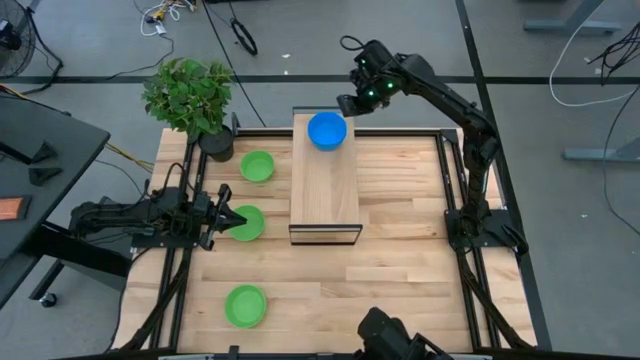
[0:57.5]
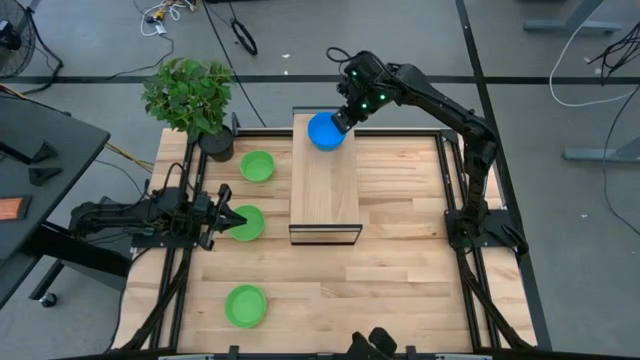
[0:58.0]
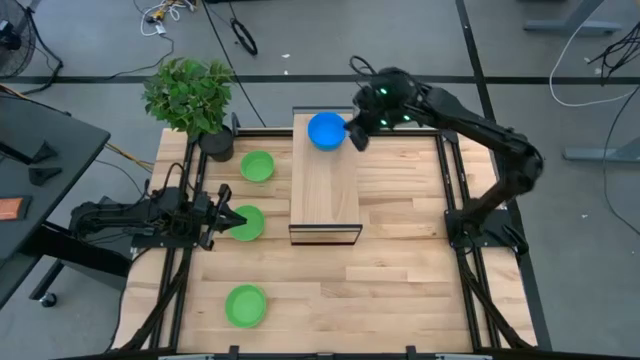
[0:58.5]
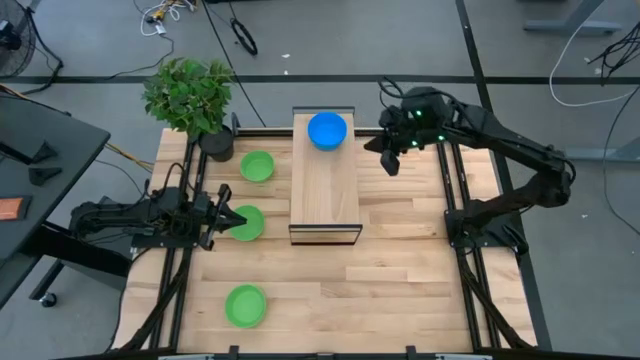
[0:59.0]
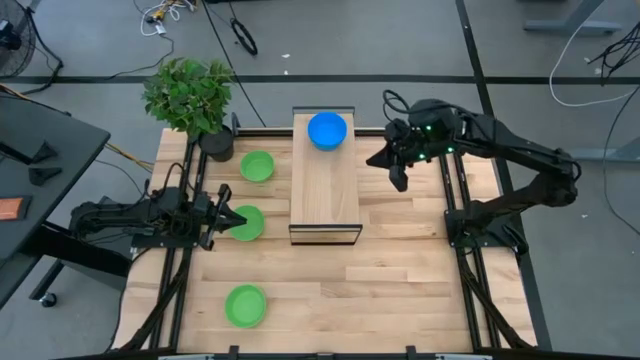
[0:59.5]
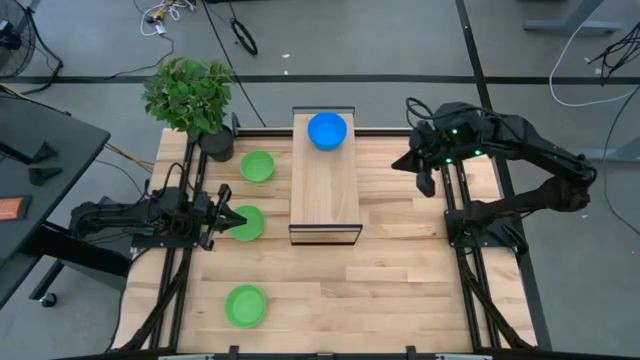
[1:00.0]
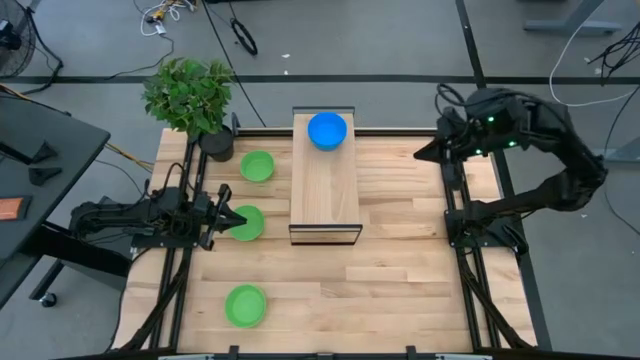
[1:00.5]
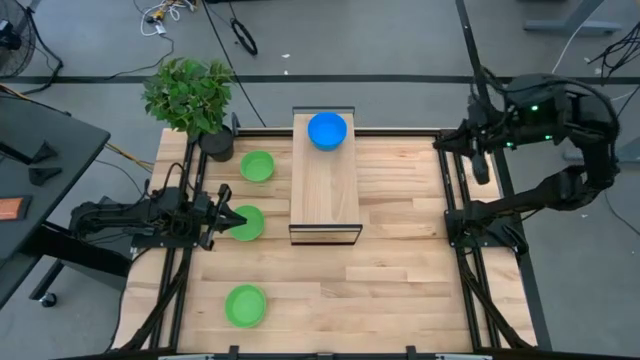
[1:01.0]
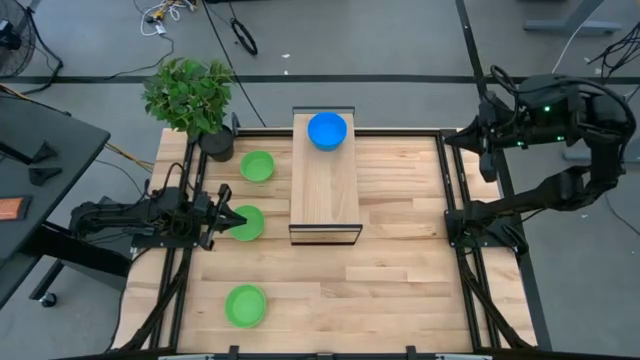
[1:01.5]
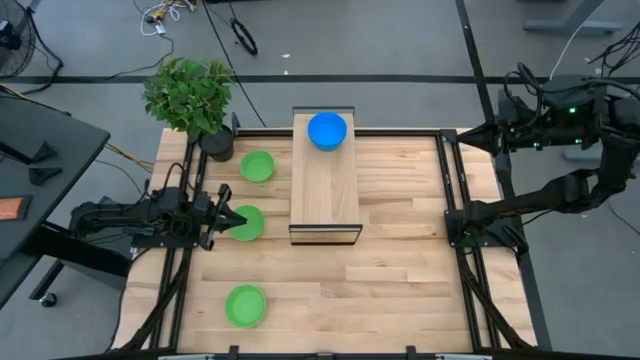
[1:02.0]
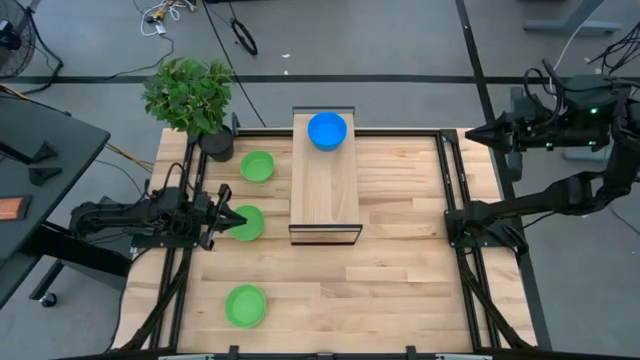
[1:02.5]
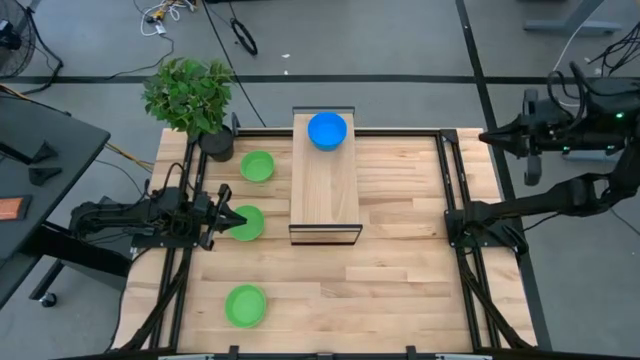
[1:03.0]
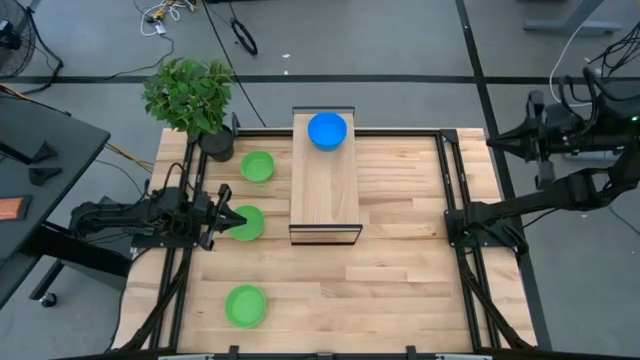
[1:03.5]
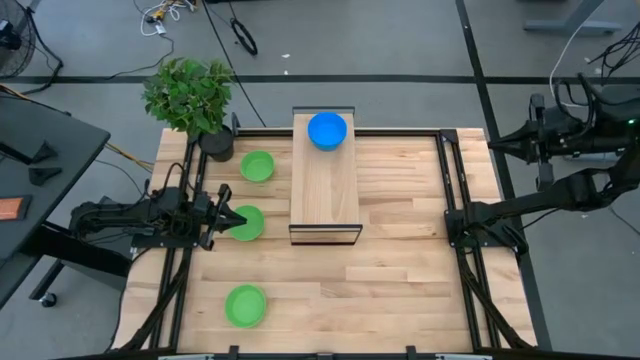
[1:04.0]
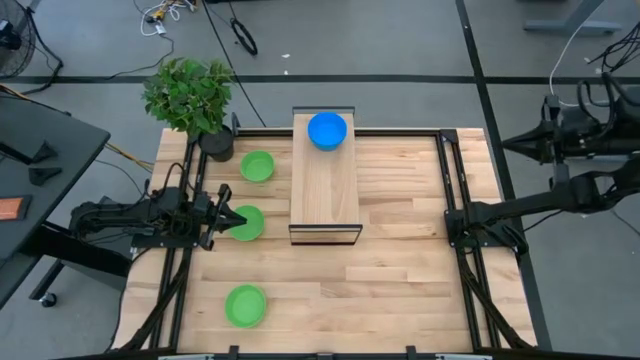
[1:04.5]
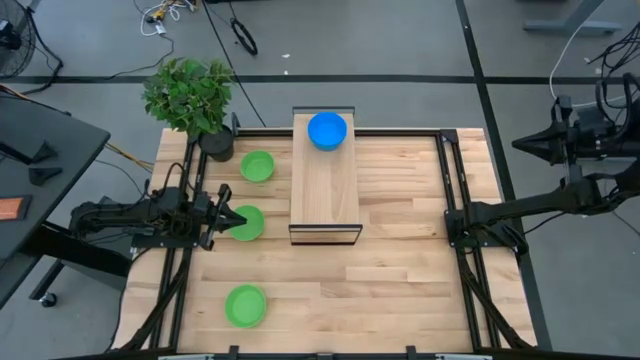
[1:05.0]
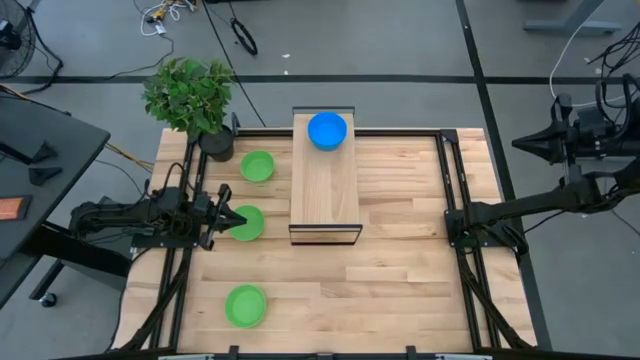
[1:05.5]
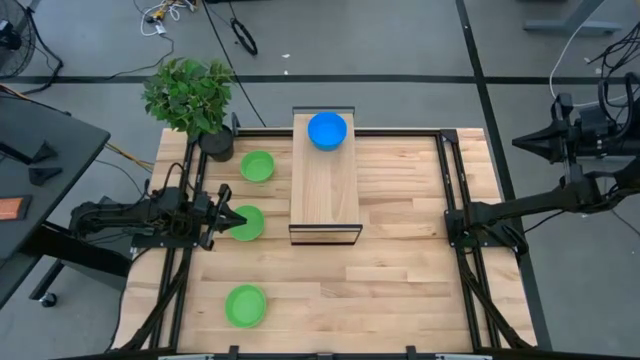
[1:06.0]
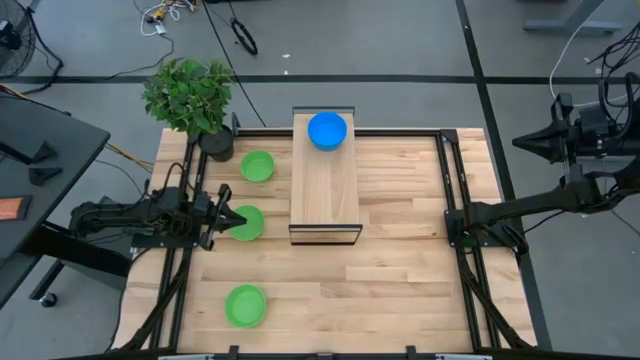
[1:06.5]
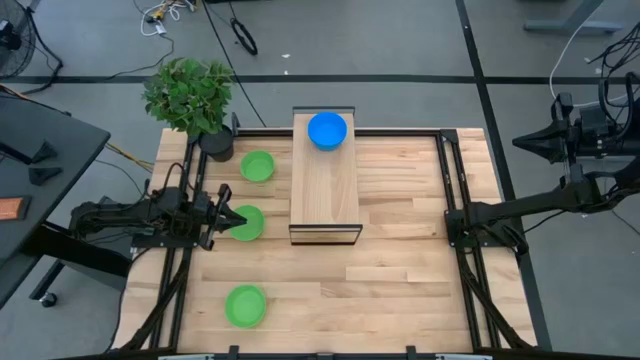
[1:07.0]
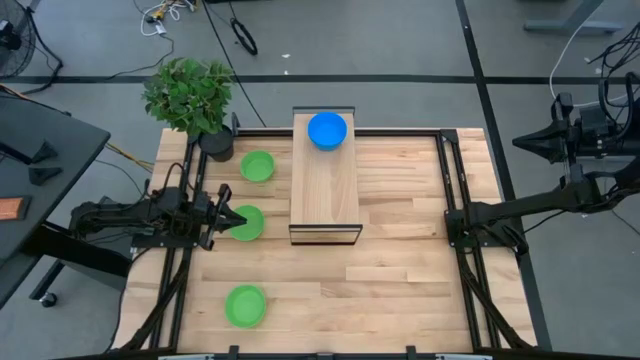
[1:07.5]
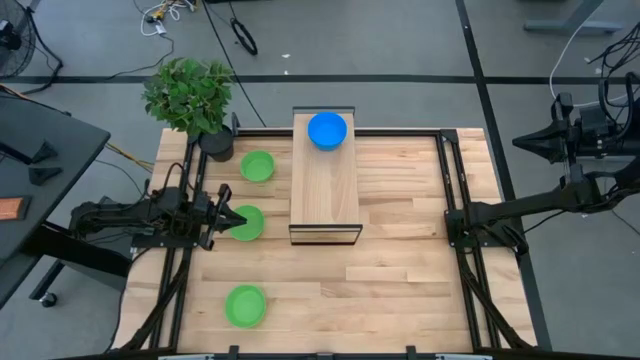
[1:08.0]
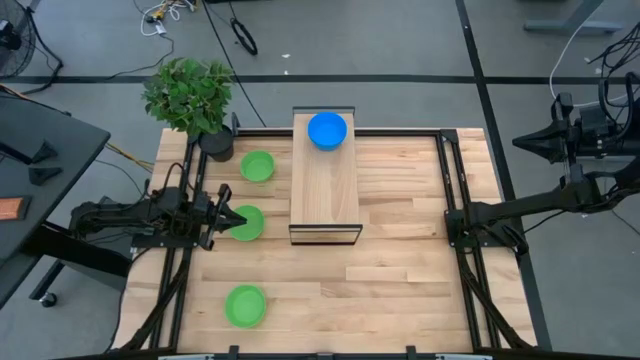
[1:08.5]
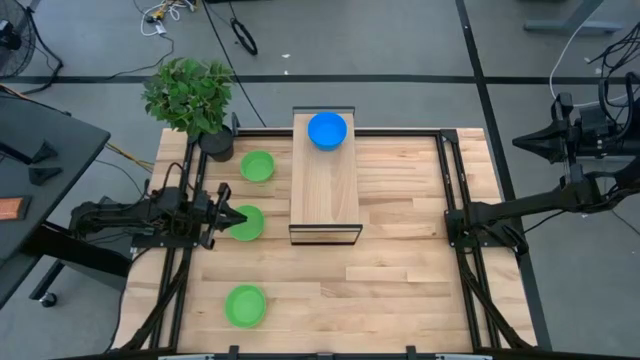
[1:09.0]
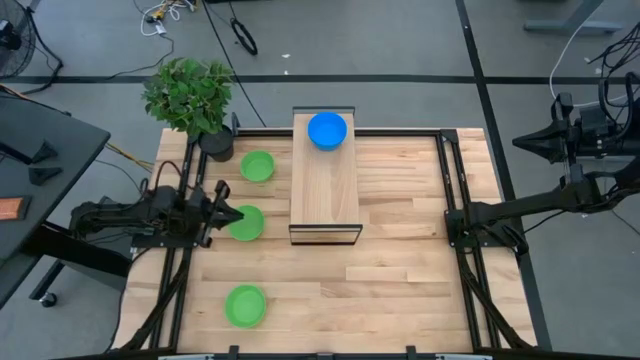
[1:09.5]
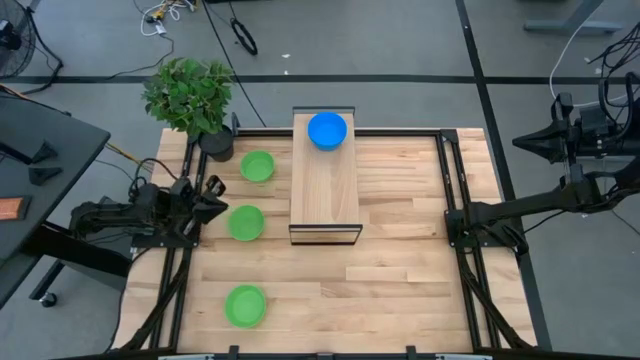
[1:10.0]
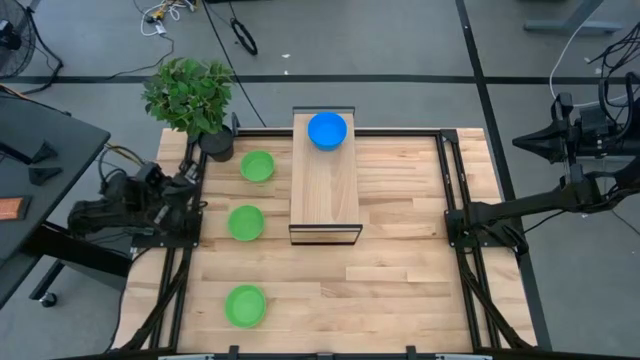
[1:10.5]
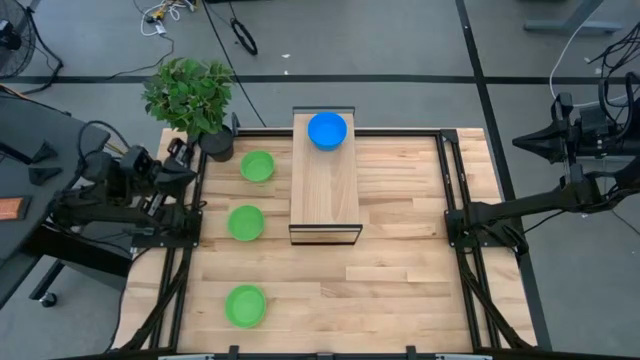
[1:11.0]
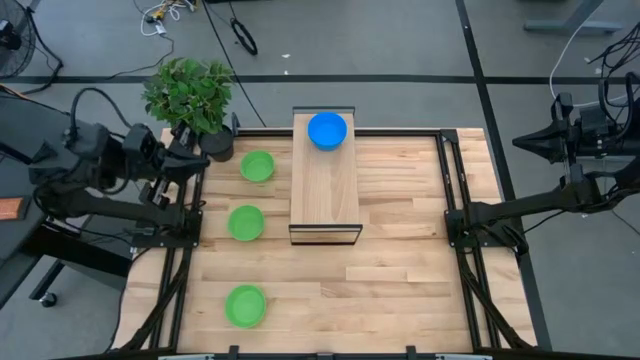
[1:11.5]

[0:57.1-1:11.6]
Task: Pick & Place Mini bowls
Put the top green bowl on the shelf

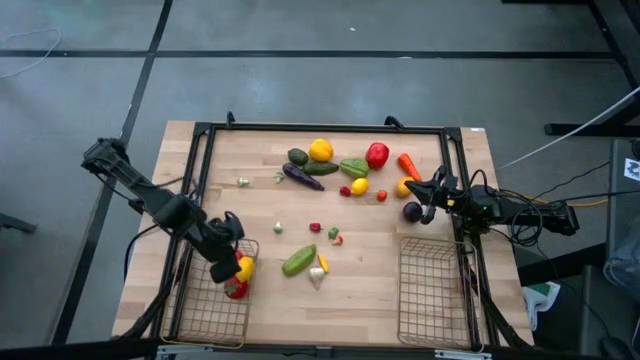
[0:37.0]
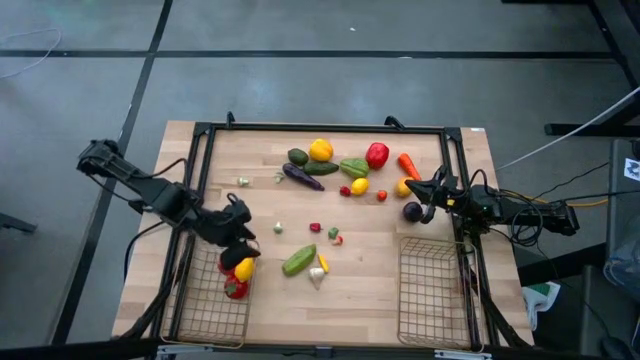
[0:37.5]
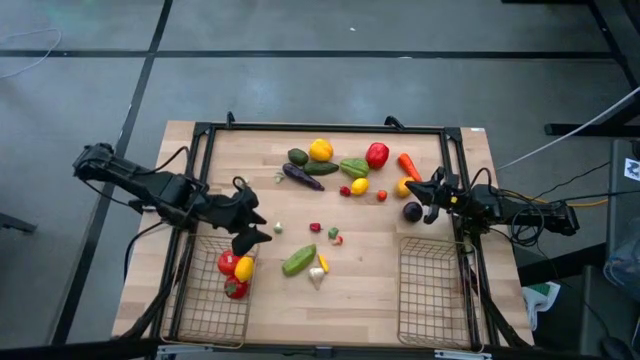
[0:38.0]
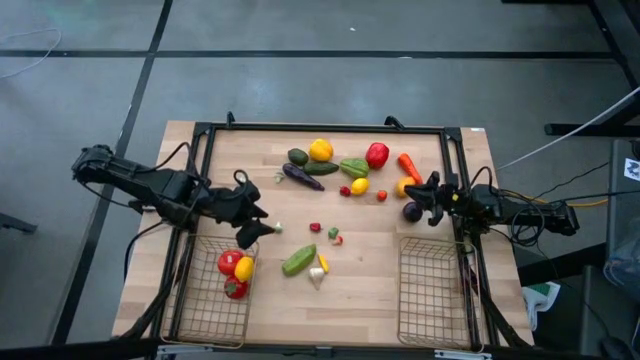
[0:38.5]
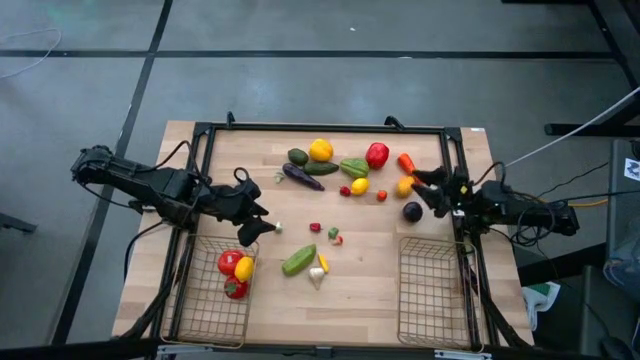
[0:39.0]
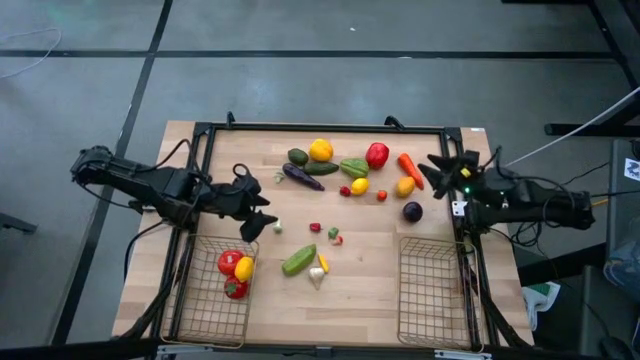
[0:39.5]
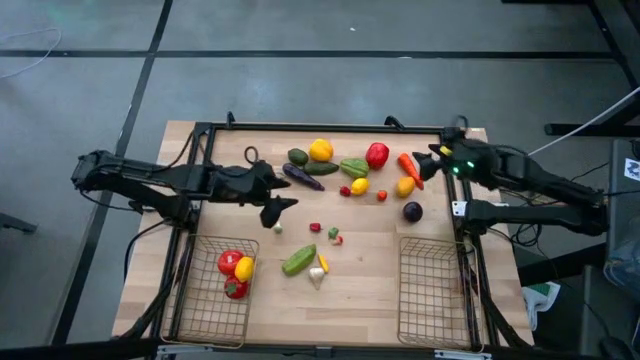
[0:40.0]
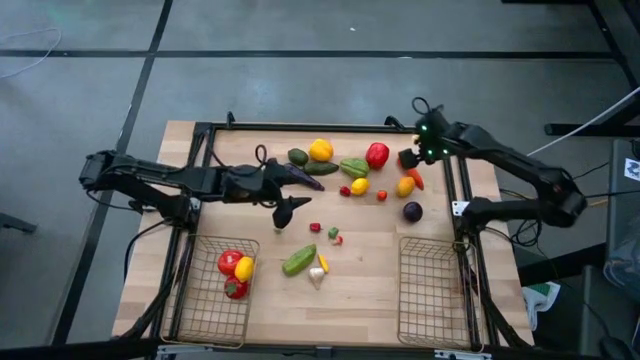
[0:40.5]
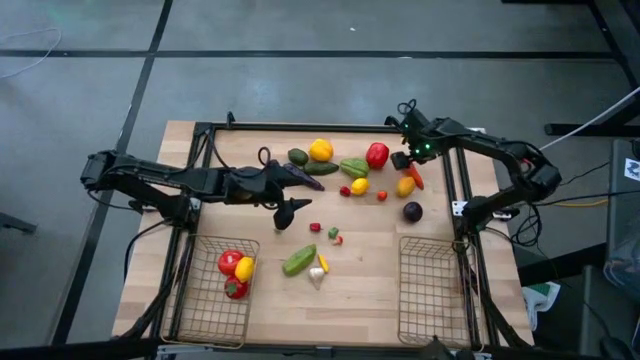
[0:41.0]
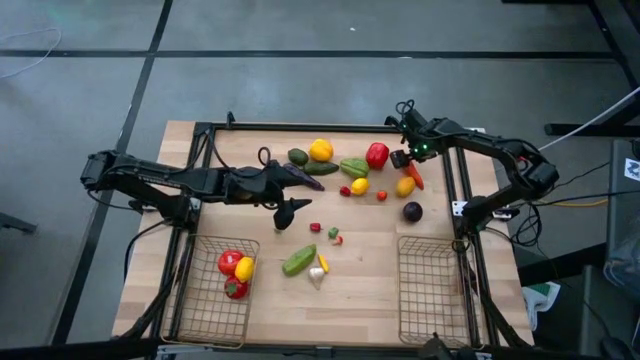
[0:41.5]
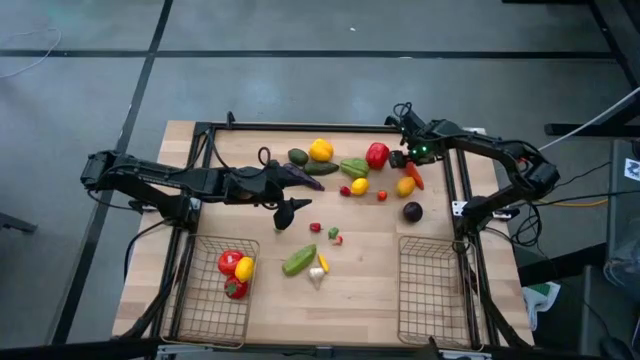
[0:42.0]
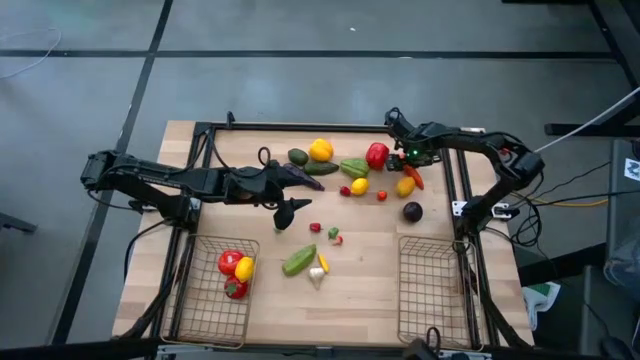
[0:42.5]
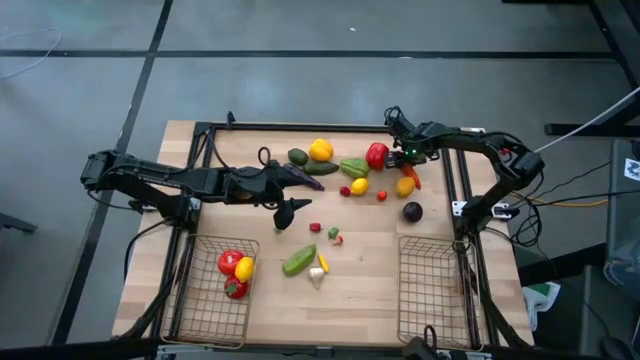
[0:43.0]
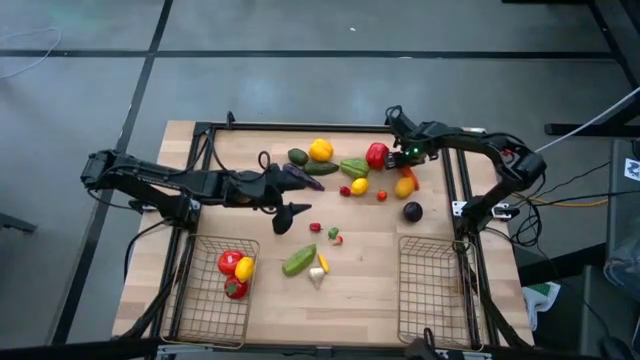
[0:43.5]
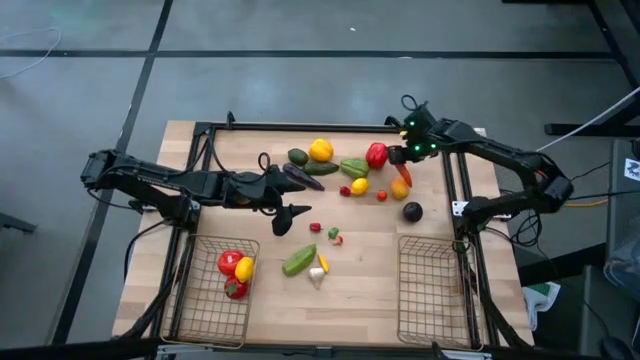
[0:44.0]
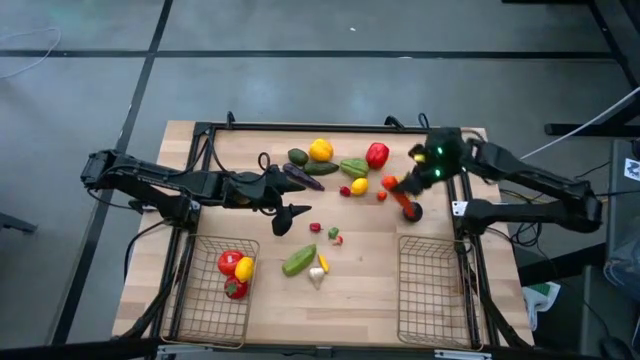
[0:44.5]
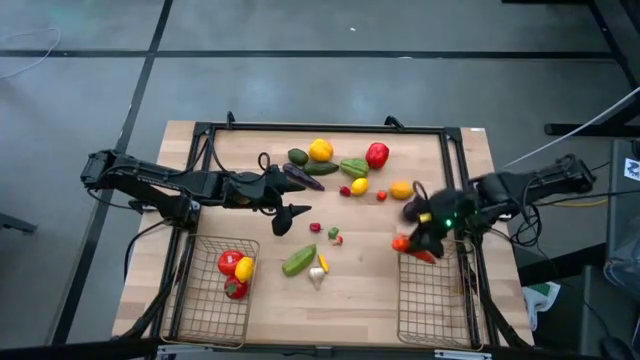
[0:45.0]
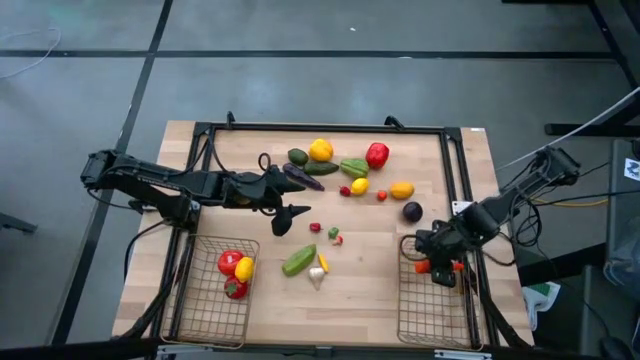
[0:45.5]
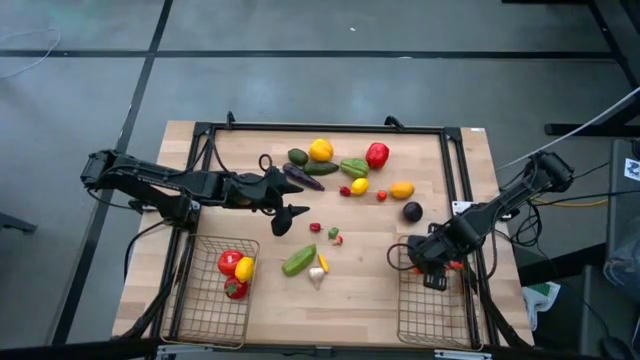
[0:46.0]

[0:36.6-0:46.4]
Task: Sort produce into baskets
Put the orange carrot into the right wire basket
